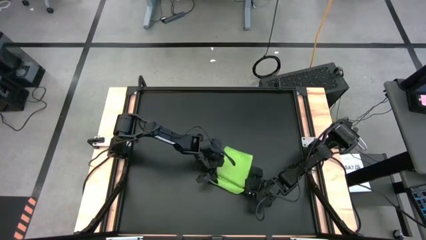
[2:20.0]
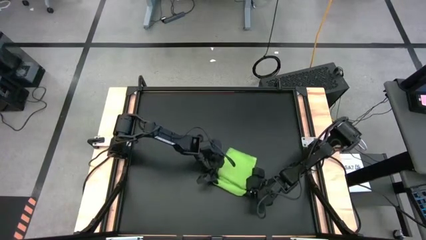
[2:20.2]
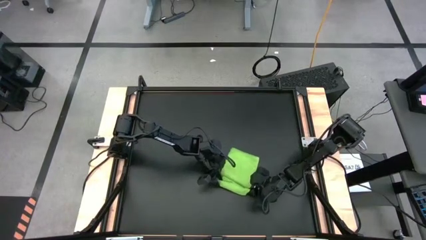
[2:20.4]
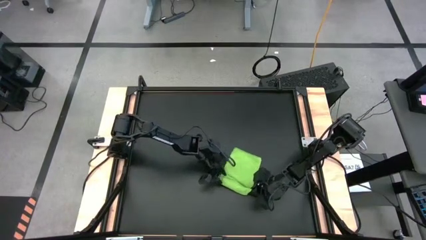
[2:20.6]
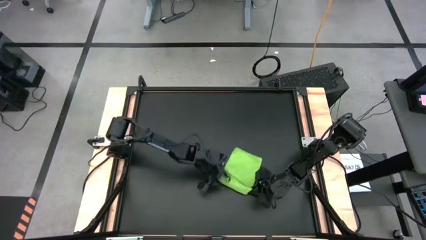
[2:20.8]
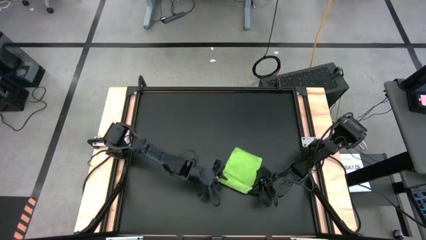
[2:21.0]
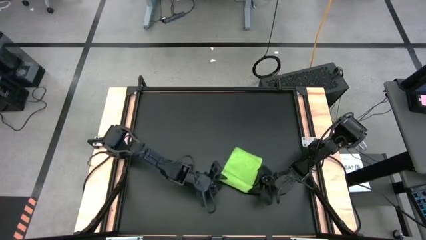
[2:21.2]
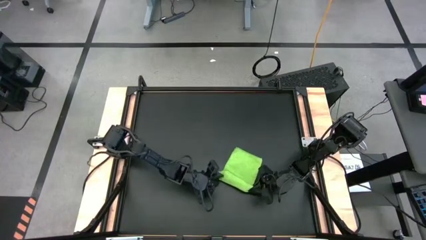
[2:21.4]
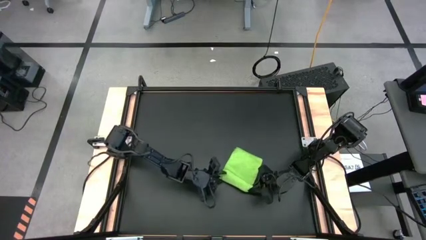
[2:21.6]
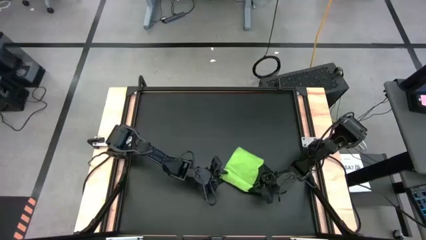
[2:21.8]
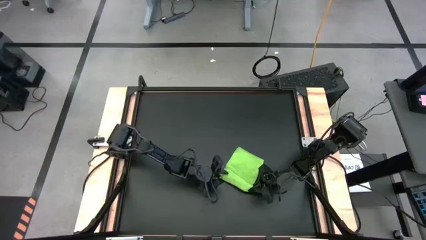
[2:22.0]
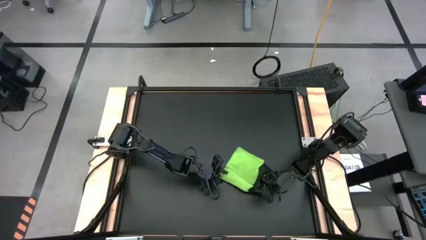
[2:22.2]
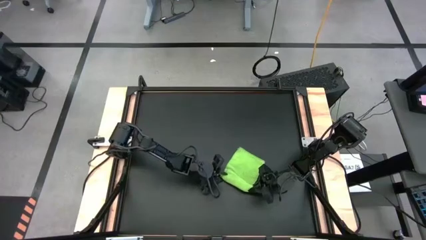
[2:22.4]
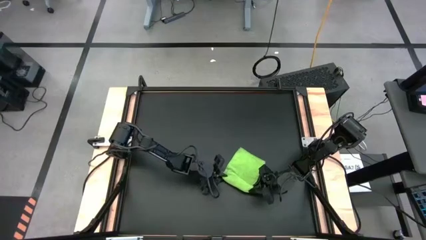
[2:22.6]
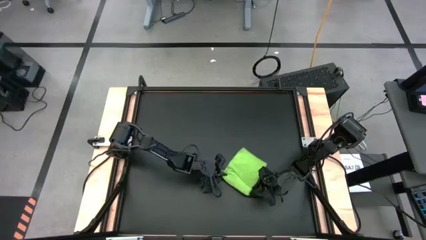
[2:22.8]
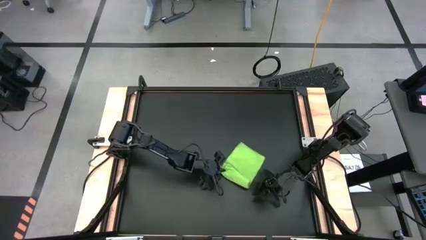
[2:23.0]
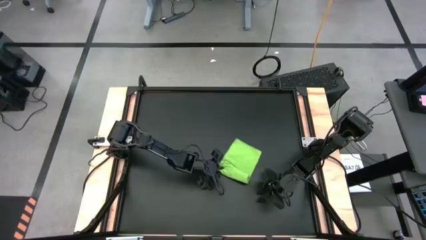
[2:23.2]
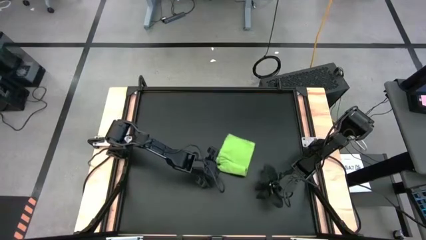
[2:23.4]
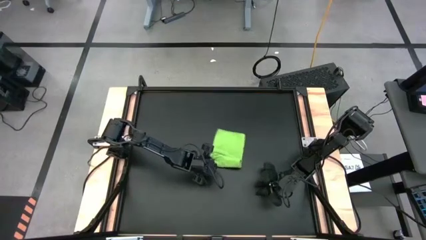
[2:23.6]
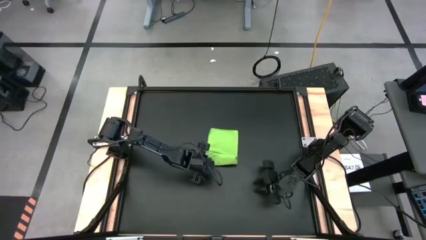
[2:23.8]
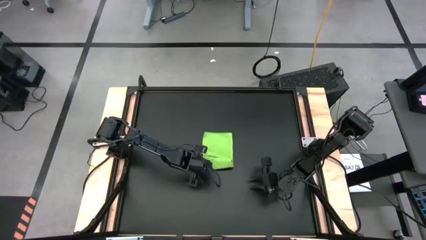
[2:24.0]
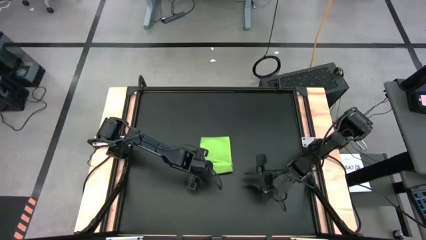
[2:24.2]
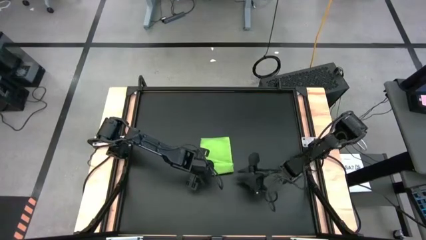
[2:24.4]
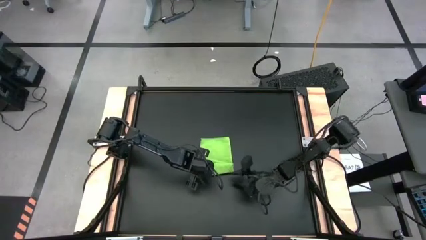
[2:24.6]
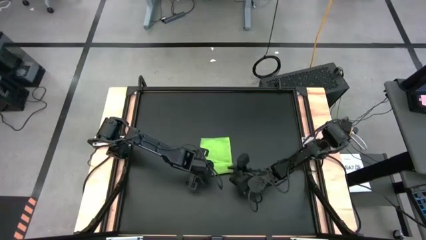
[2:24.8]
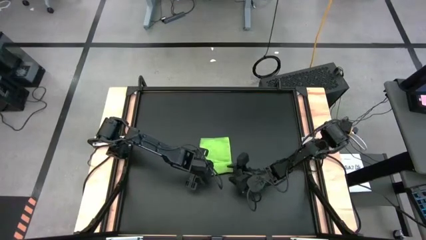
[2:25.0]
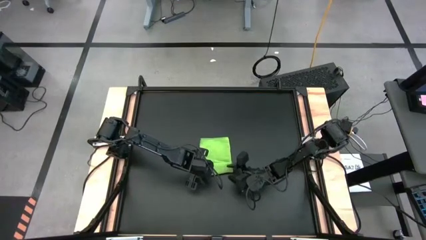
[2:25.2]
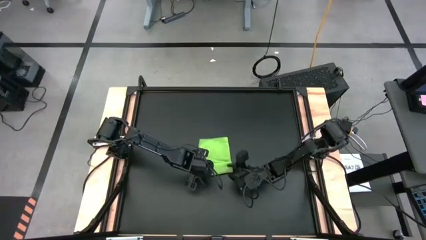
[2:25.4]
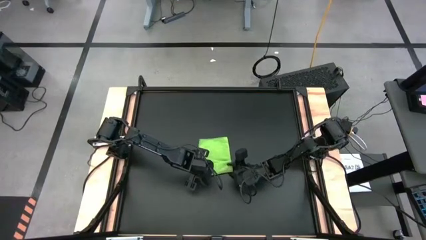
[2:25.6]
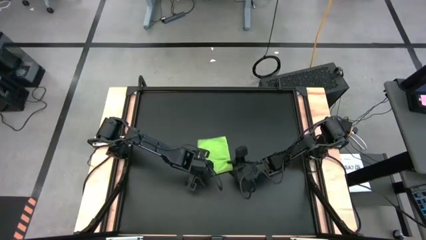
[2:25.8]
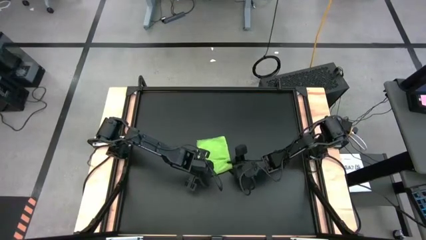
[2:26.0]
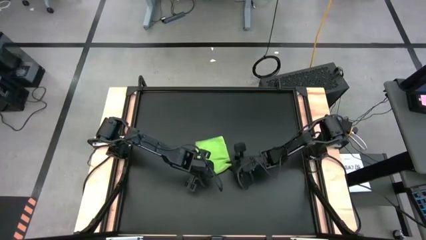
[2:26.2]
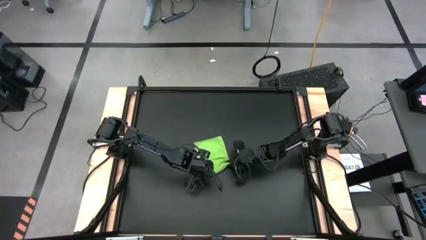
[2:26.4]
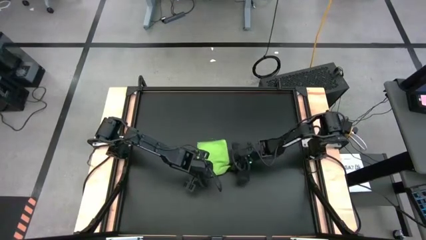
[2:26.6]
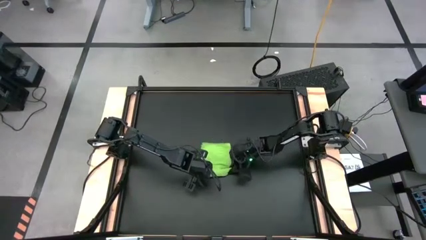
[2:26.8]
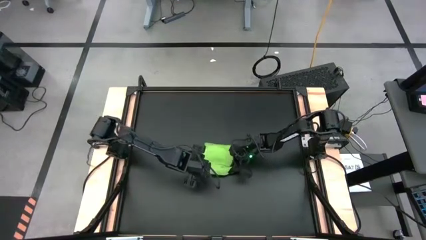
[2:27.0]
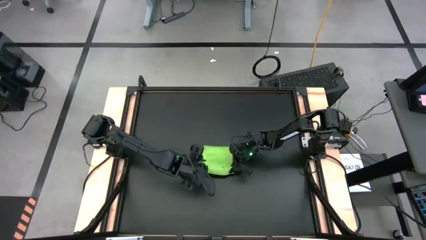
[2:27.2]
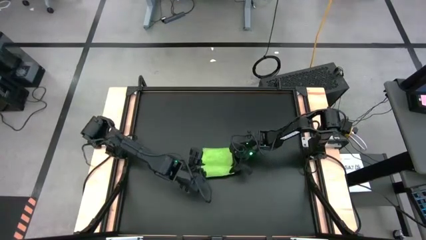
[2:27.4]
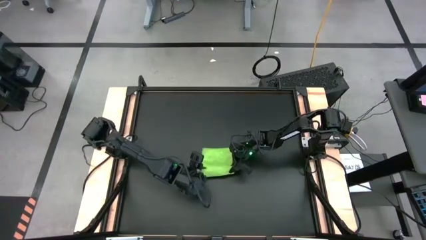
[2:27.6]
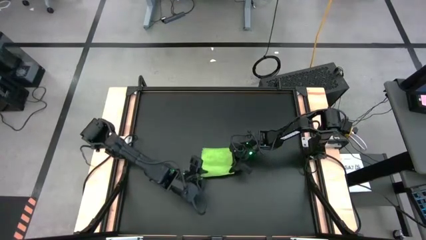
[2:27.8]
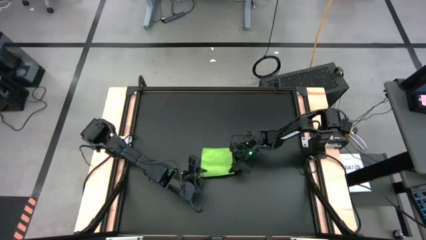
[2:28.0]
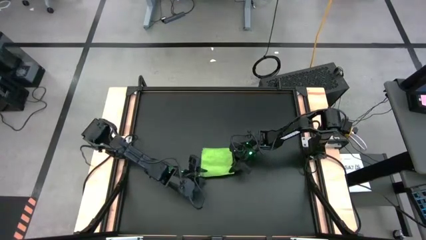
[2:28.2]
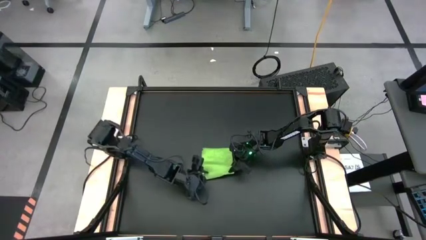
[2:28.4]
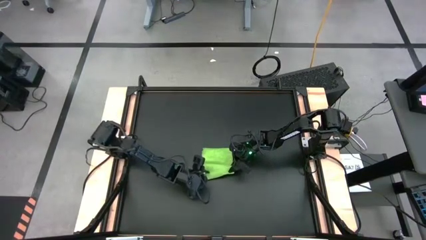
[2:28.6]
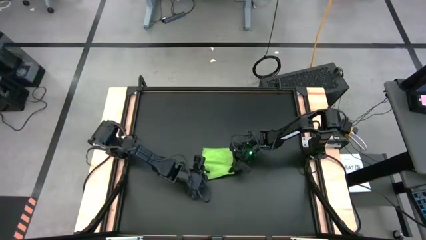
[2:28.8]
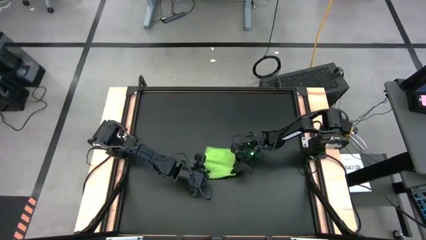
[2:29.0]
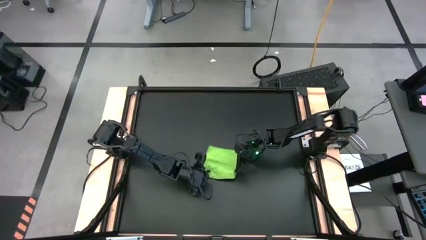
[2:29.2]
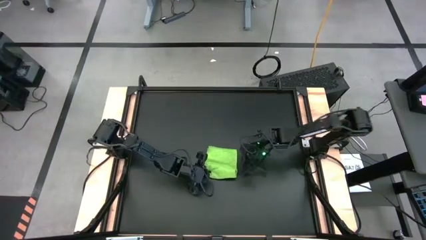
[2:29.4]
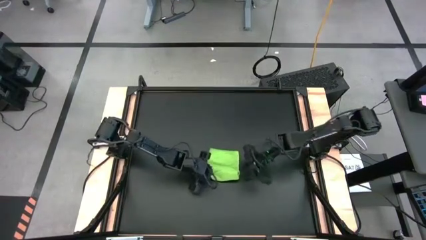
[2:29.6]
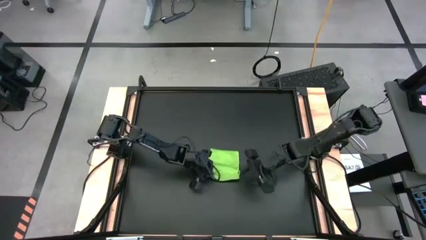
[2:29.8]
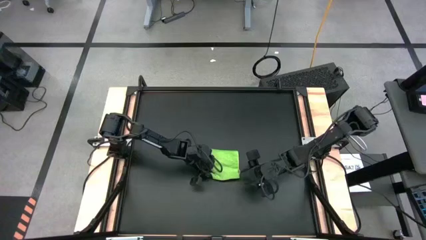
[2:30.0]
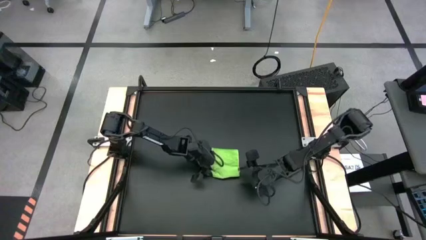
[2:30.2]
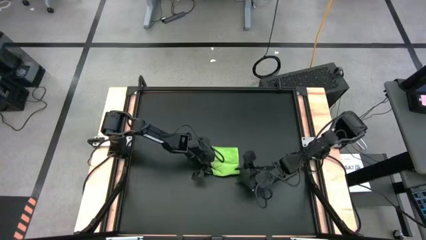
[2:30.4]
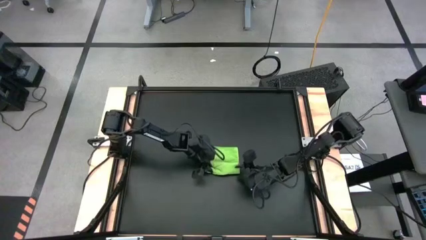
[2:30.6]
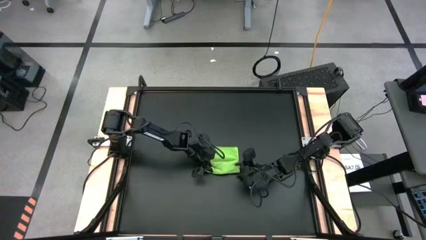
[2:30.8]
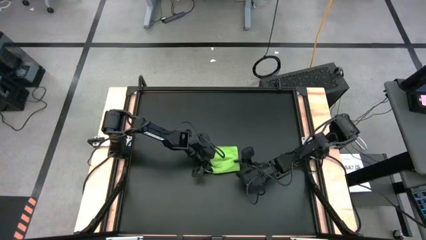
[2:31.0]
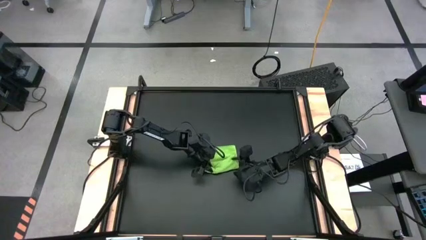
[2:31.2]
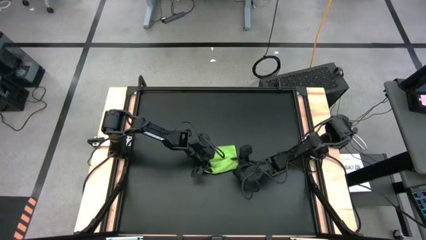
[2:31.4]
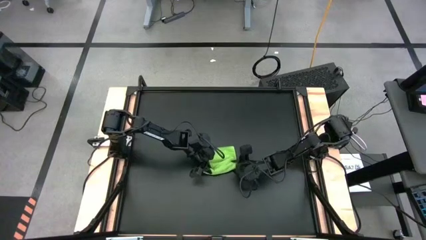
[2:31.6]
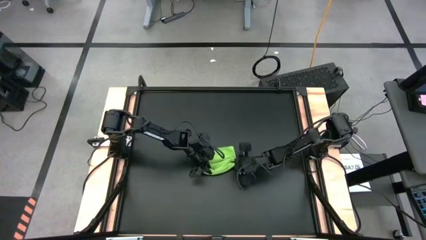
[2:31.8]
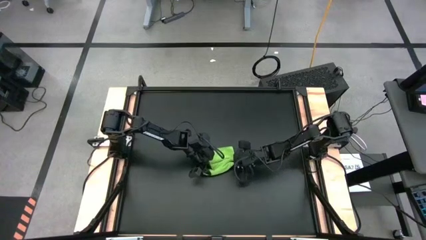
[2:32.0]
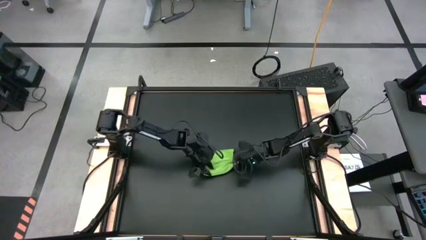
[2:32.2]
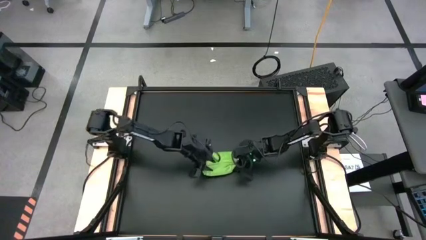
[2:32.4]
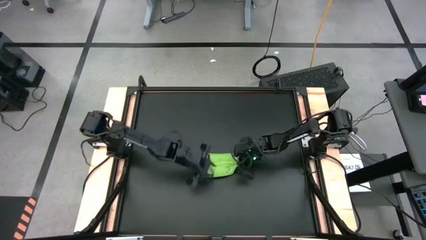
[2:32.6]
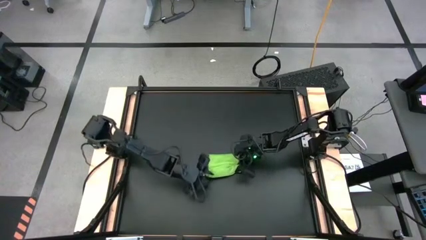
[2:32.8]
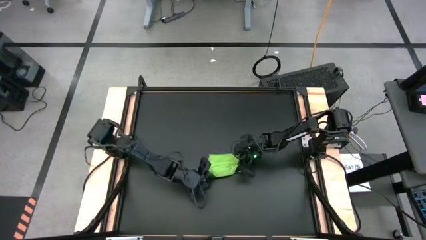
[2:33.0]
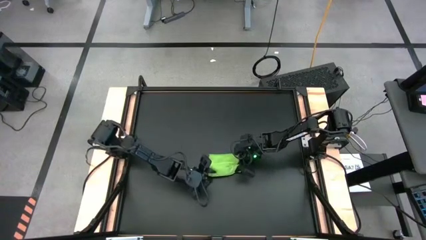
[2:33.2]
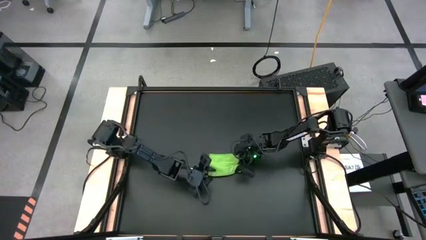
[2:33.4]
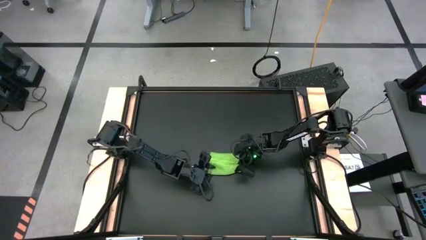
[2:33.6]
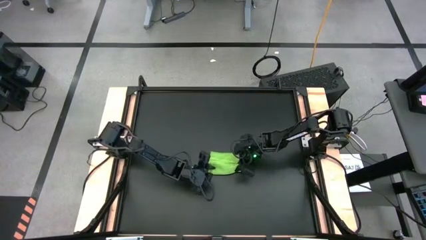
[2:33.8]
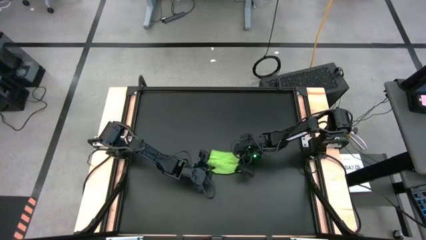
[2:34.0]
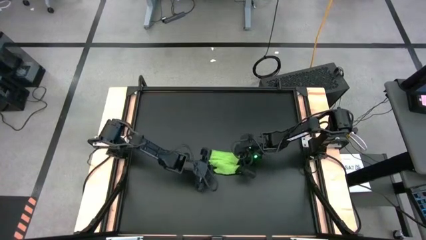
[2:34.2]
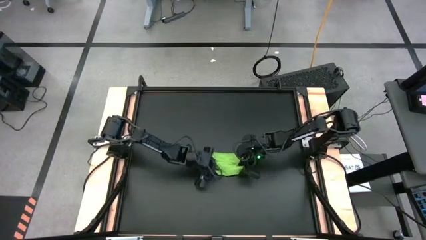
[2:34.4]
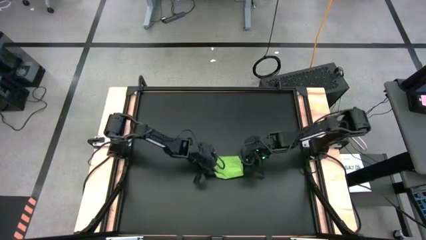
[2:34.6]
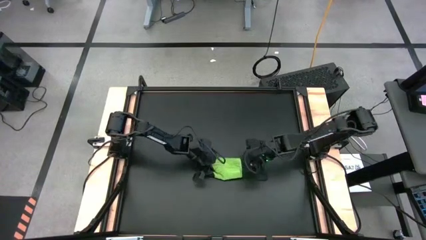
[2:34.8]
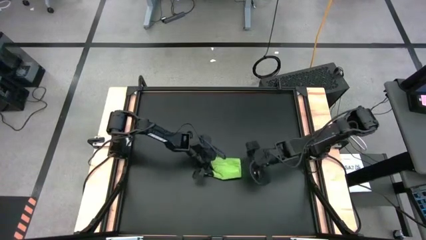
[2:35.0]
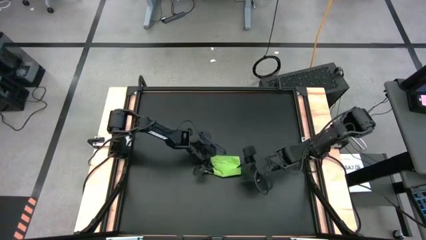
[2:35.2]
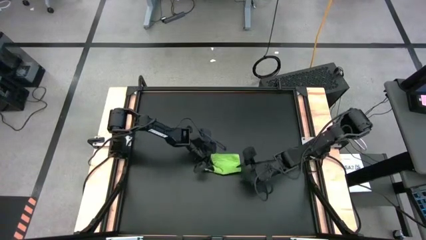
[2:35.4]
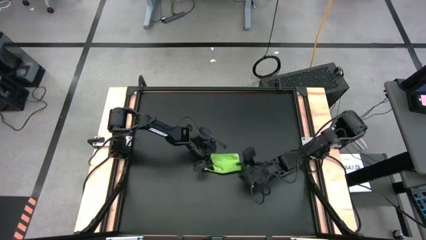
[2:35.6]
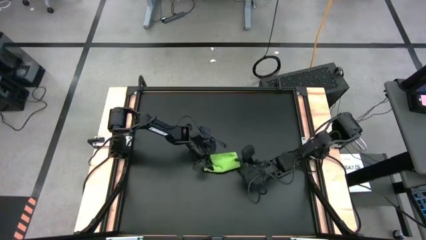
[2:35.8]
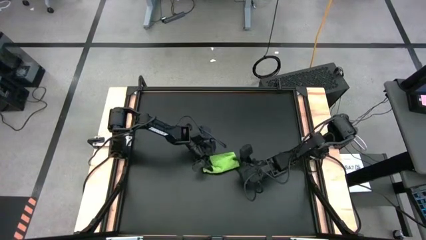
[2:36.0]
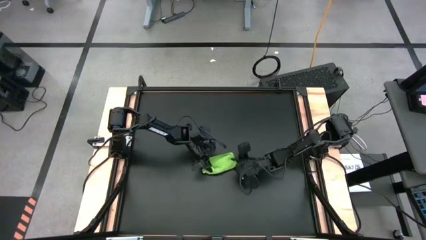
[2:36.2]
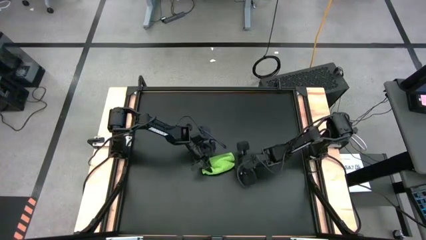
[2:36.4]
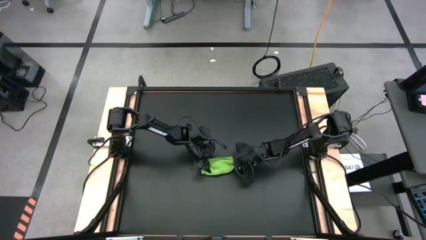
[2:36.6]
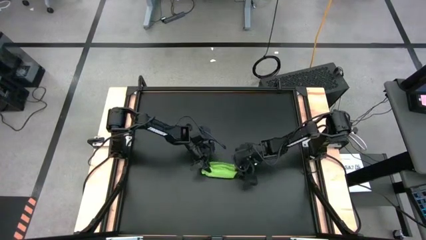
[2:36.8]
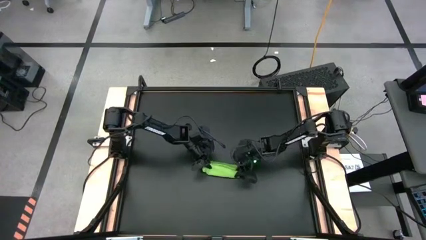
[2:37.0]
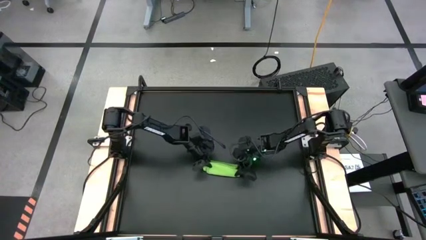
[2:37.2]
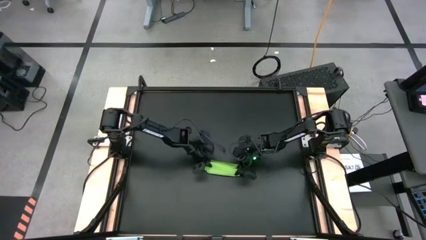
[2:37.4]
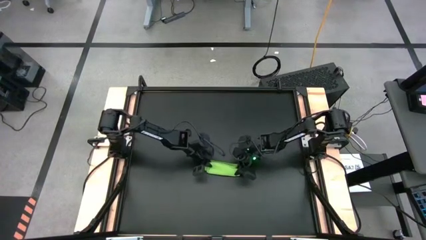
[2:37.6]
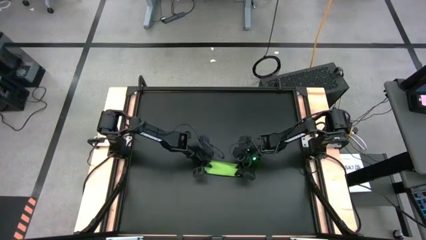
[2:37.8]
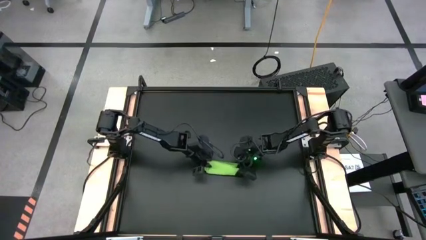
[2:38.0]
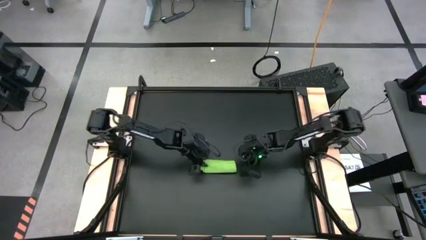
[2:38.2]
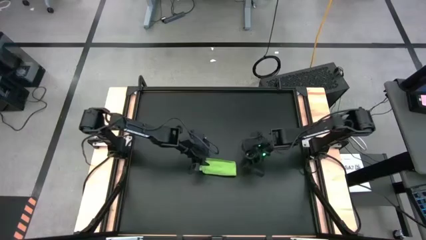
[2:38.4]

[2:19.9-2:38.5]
Task: Roll towel into tight, uniform cylinder
Roll the green towel
